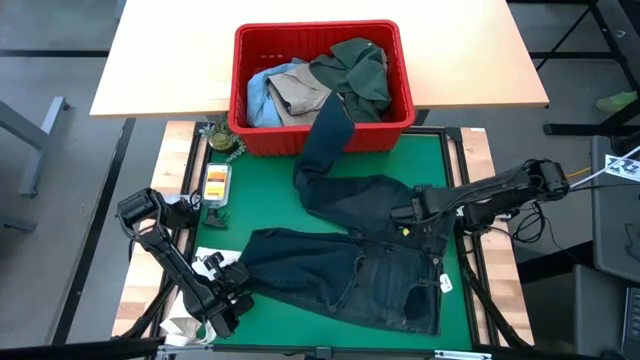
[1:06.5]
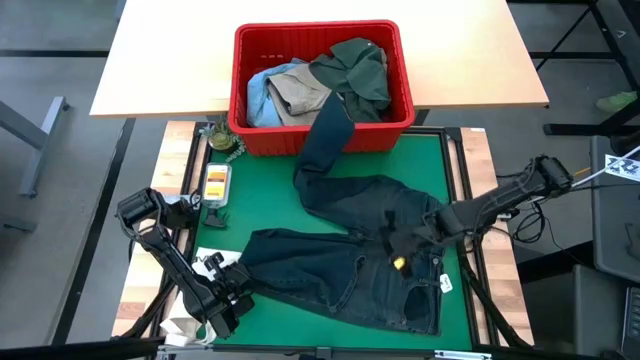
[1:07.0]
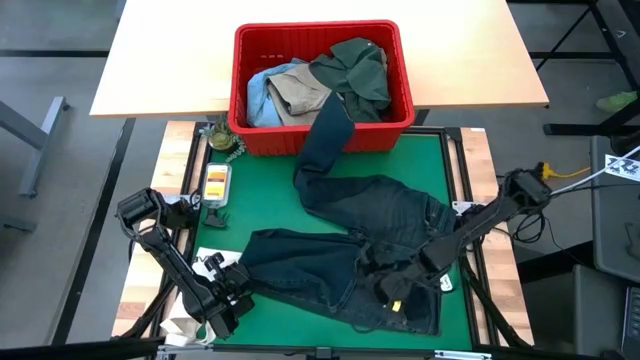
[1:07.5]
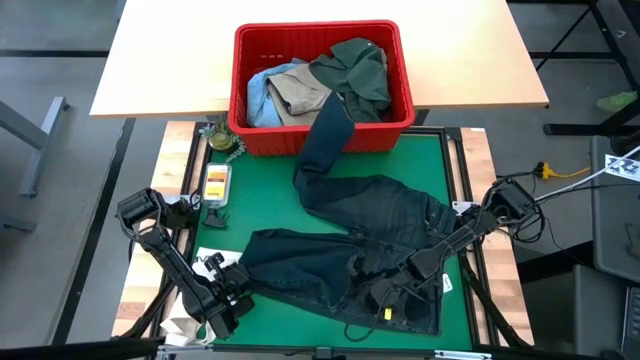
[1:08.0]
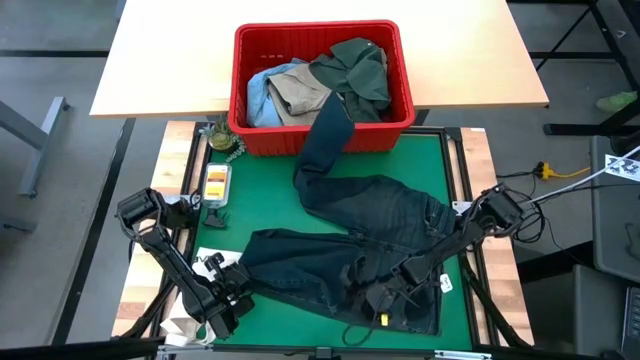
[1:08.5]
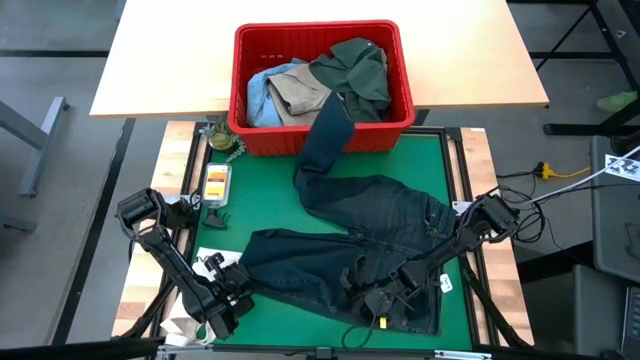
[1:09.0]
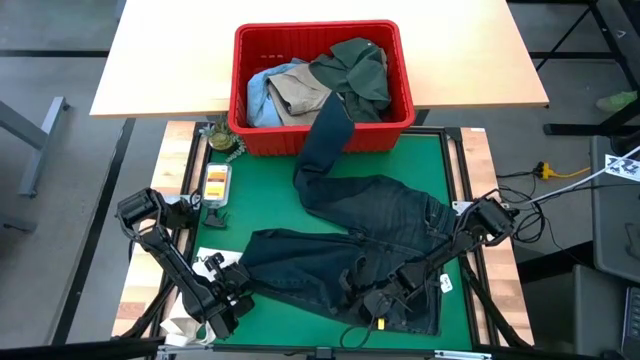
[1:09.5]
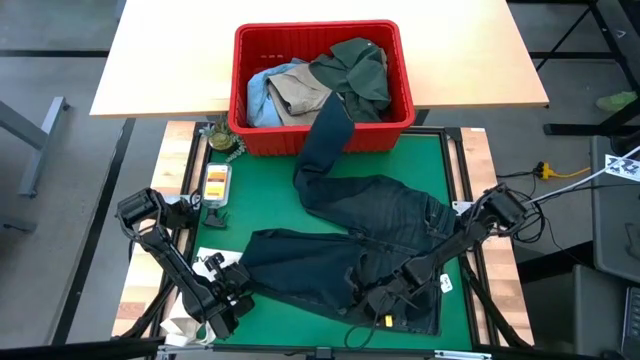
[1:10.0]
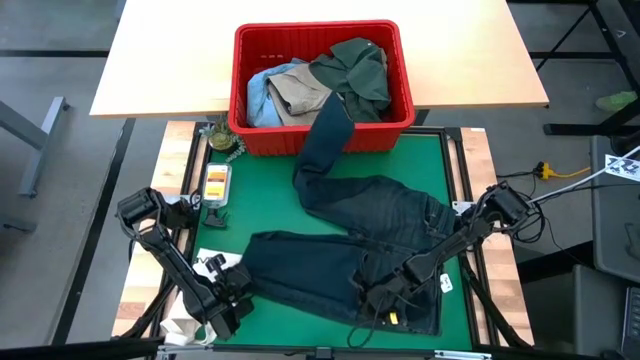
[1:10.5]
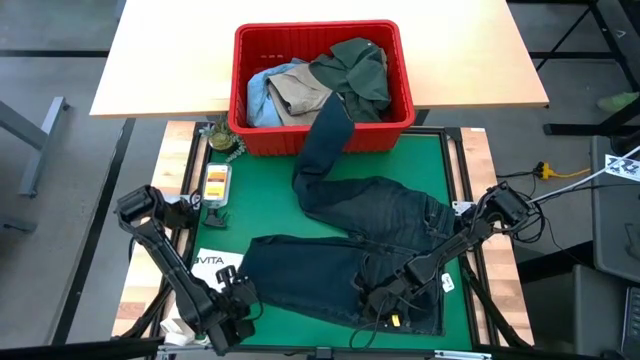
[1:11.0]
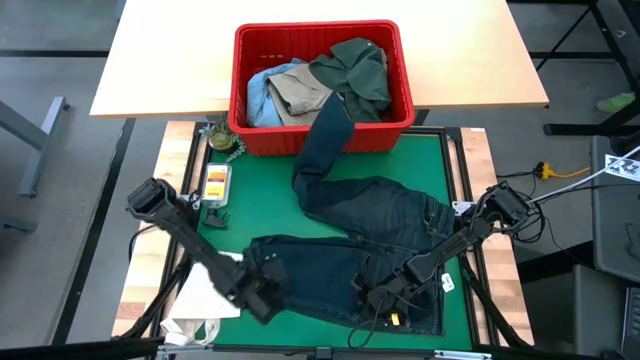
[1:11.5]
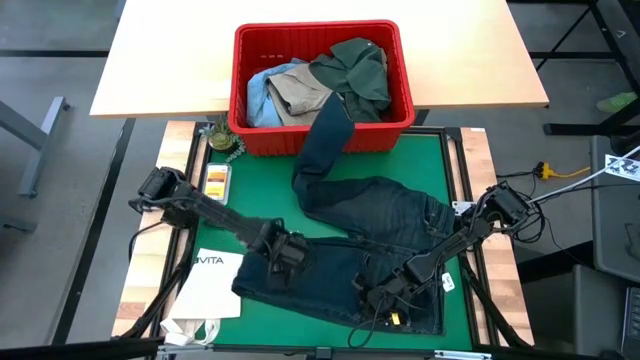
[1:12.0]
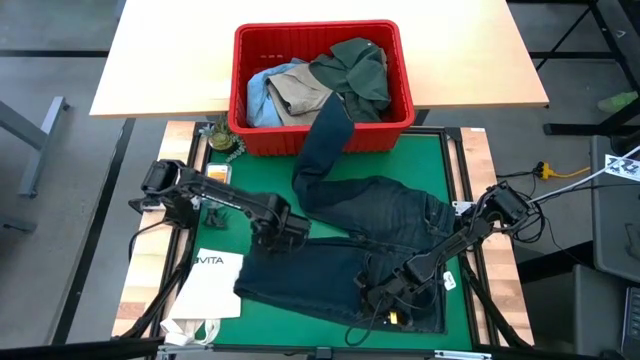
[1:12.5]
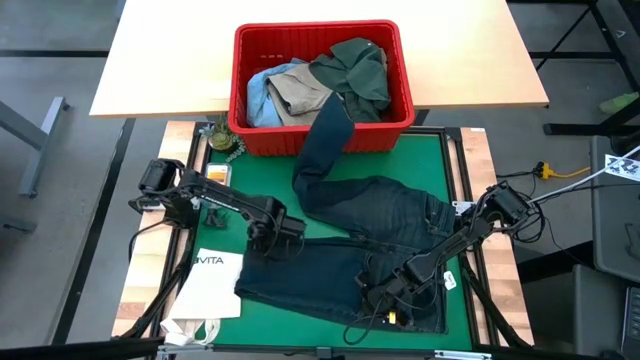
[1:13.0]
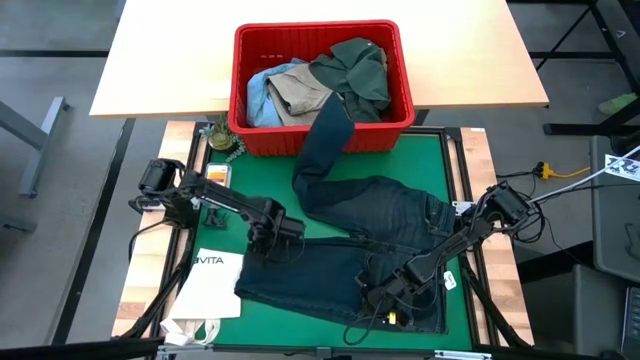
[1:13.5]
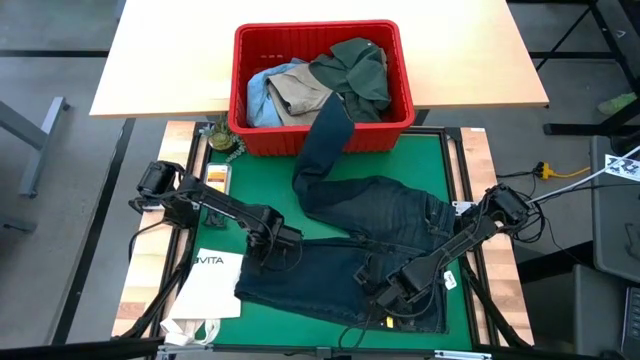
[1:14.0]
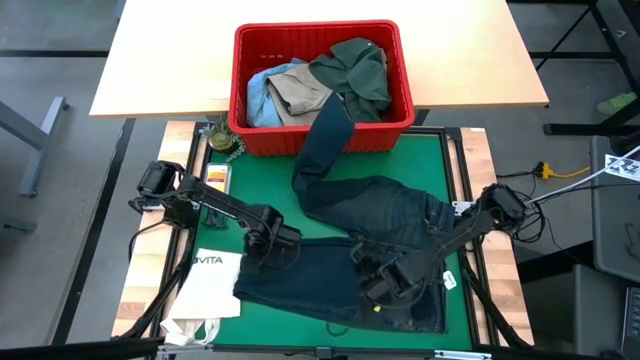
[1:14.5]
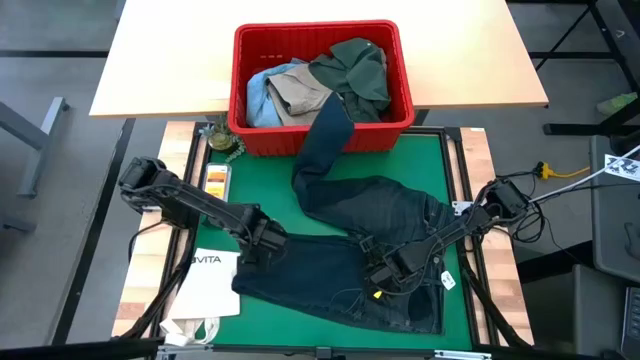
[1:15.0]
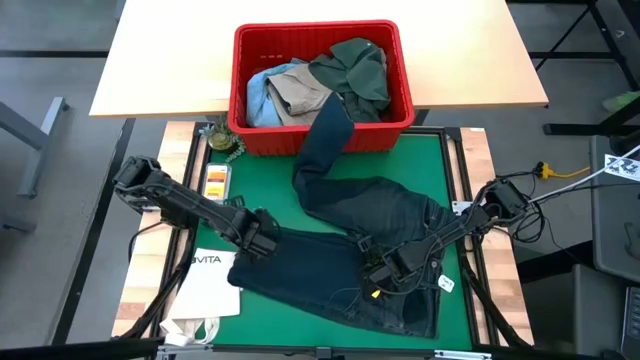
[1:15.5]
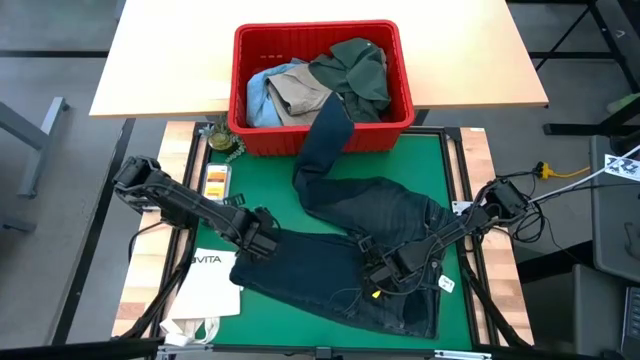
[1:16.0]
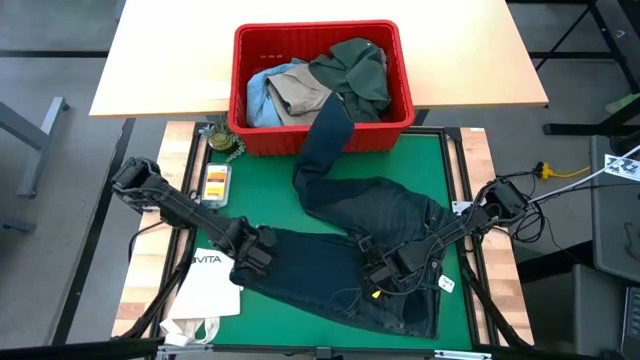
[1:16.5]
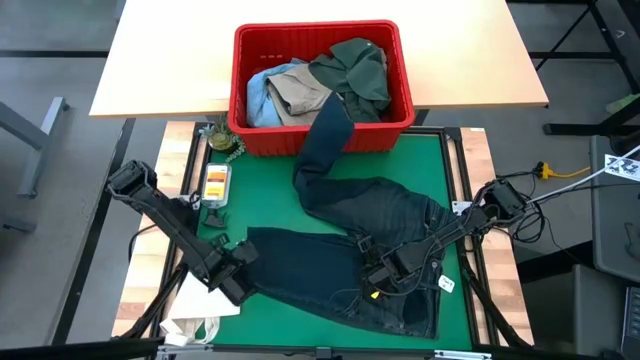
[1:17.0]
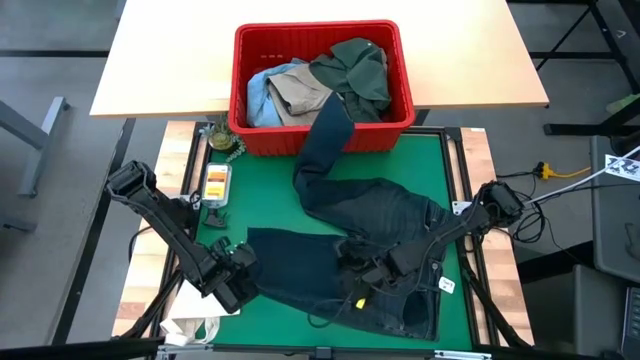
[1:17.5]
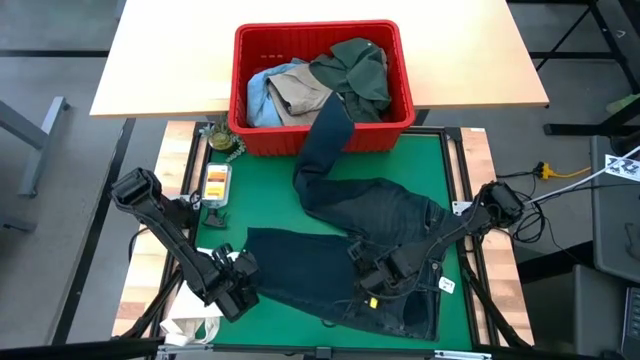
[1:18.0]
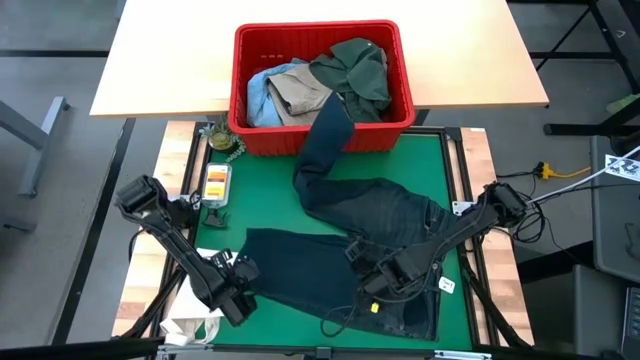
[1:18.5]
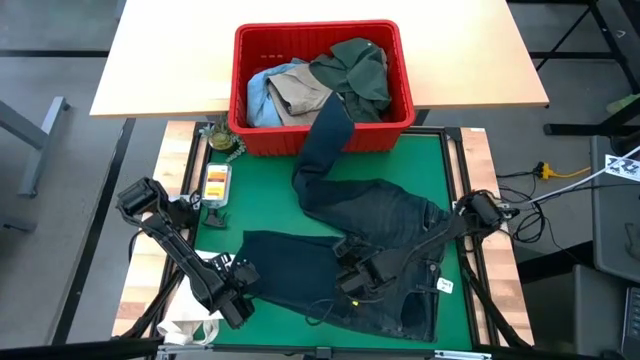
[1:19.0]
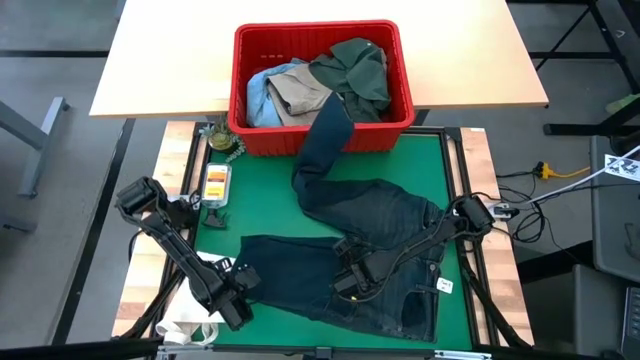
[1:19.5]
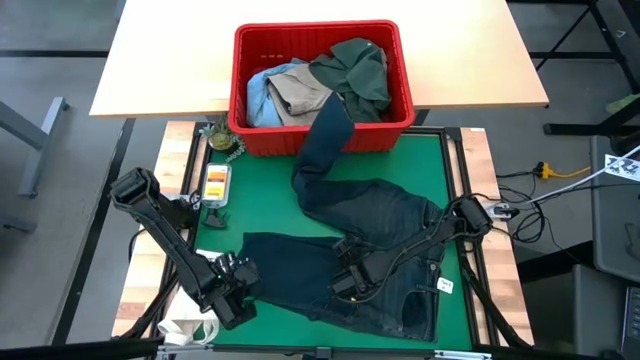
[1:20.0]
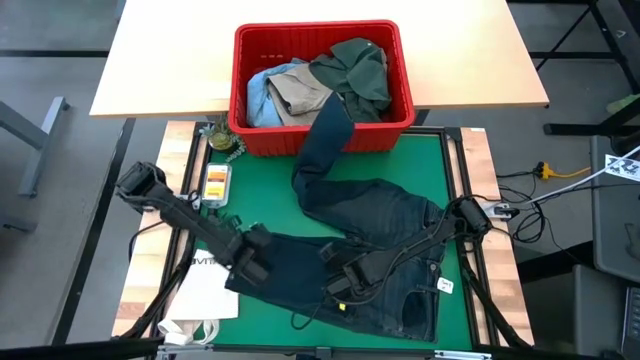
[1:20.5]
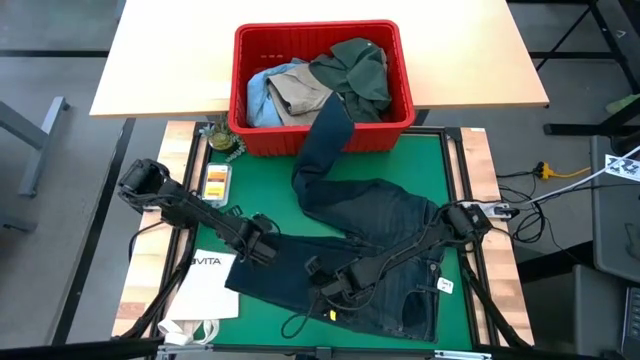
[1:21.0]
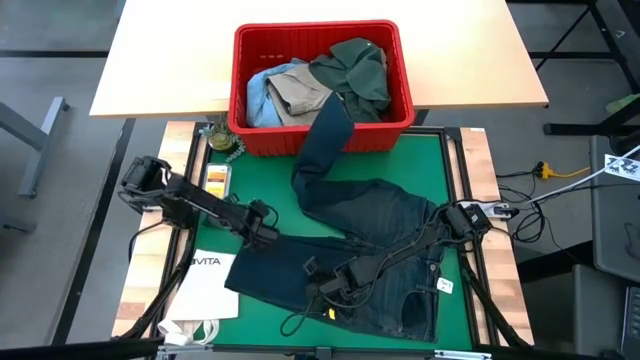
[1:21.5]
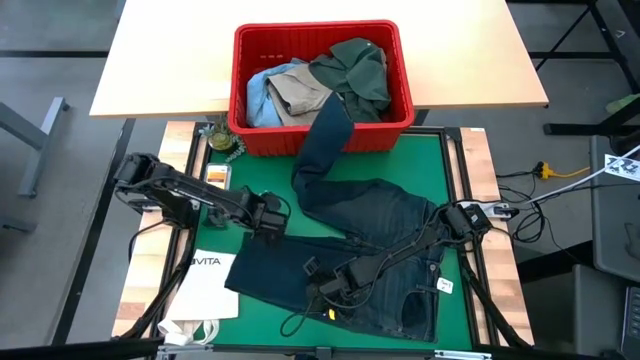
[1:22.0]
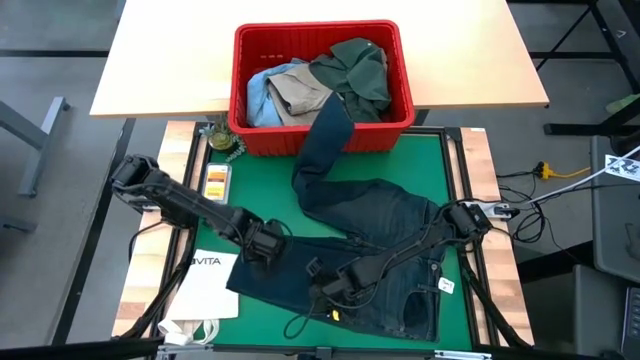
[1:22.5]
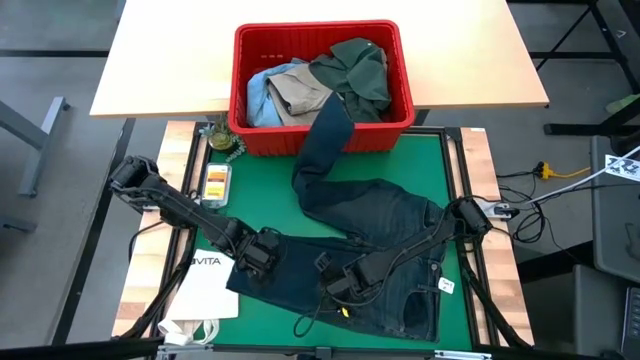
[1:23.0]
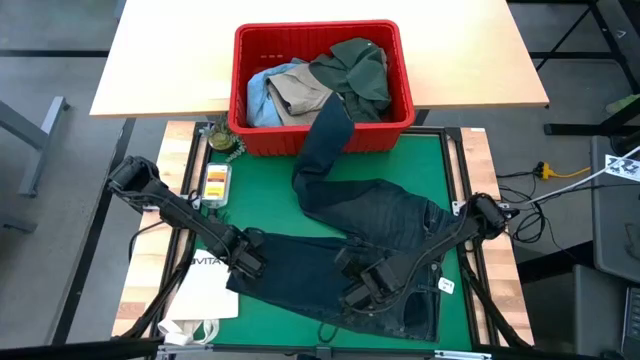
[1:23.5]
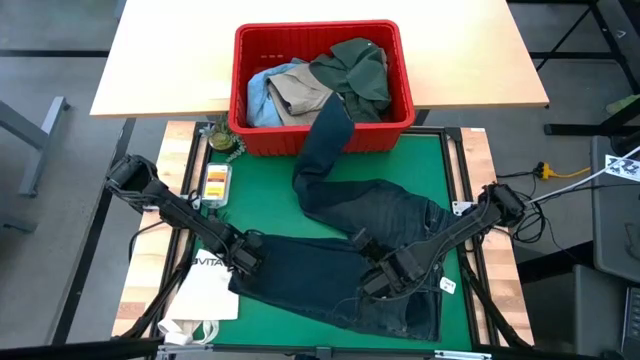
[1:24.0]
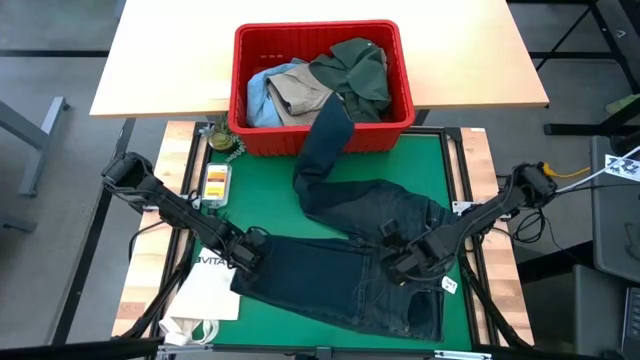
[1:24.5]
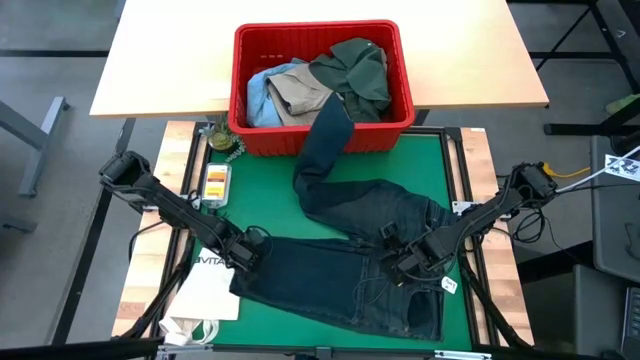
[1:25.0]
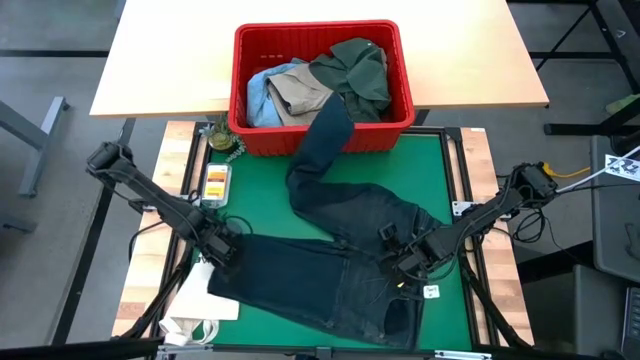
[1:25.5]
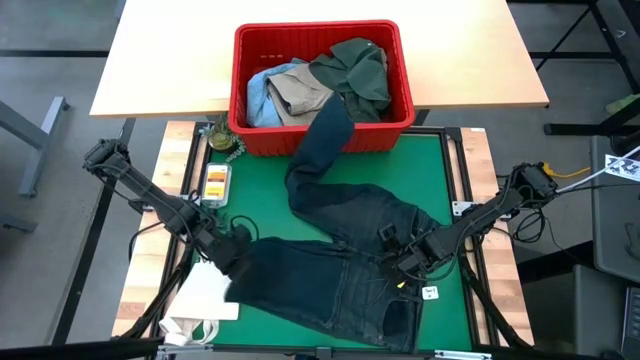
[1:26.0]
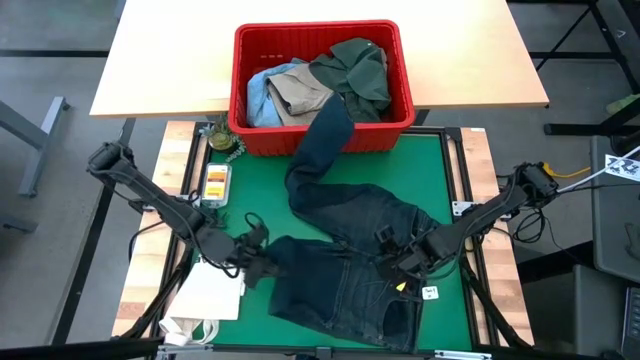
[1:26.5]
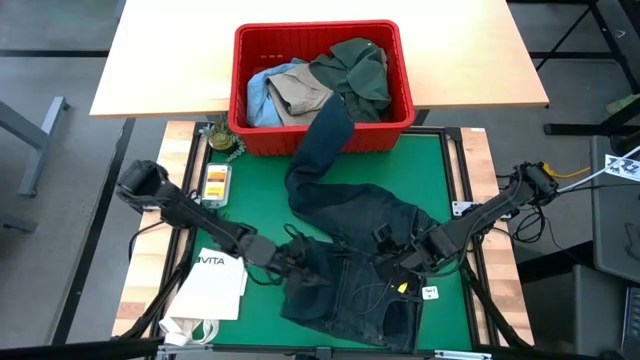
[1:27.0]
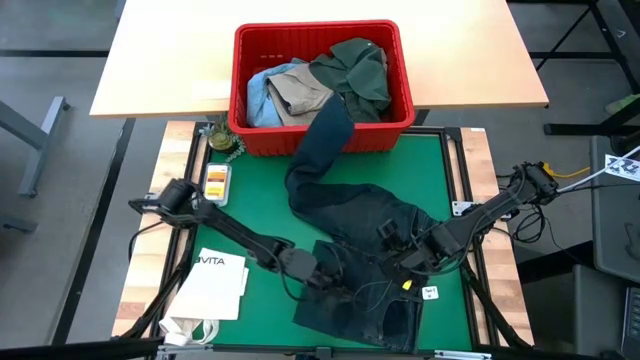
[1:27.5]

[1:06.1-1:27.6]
Task: Fold Laundry from Bin
Fold the dark blue pants

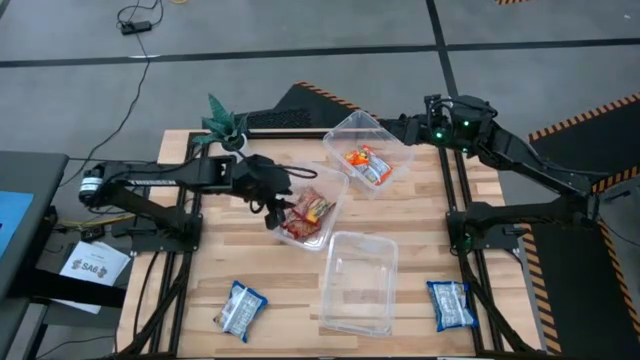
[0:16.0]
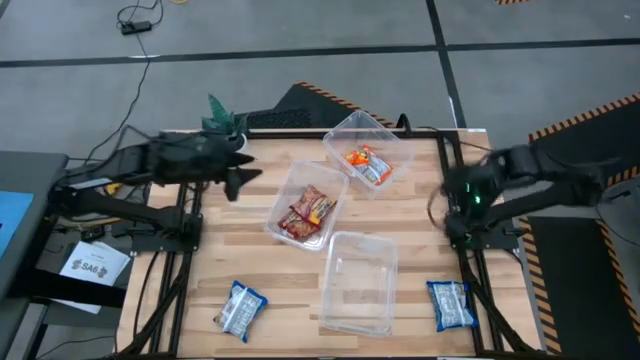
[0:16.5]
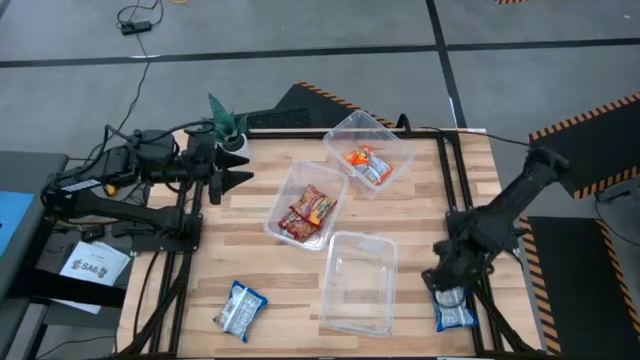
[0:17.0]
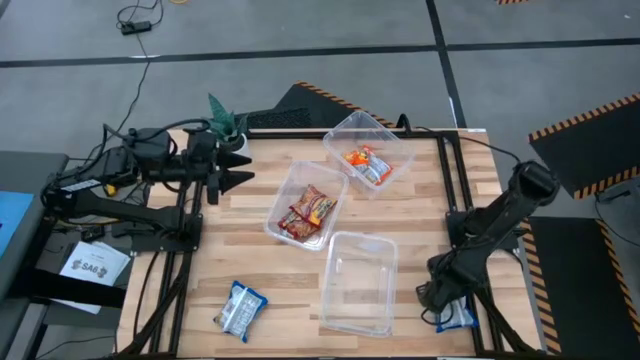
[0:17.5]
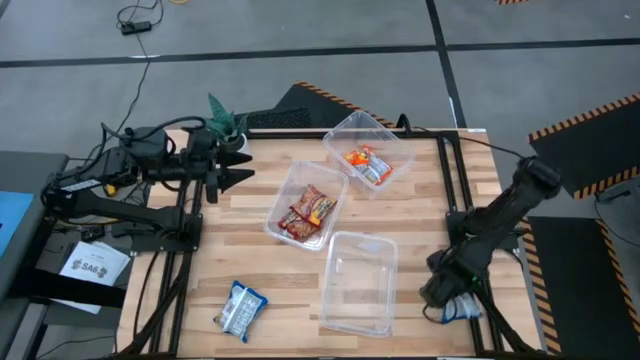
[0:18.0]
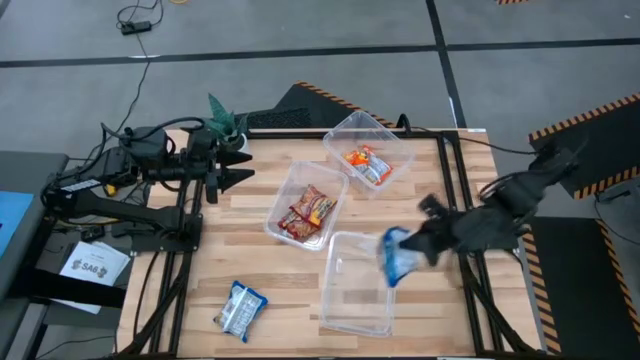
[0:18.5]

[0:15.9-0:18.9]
Task: Sort Maruchan noodles
Put the right blue noodle pack into the bottom transparent bin
